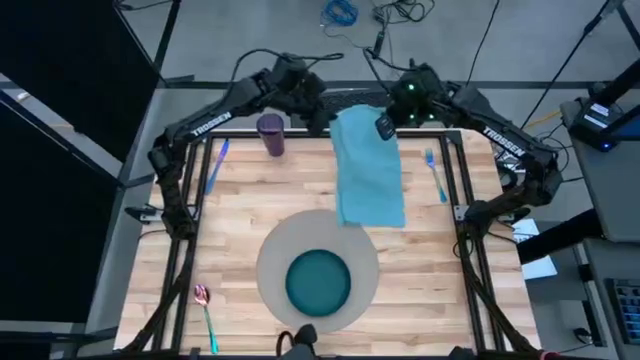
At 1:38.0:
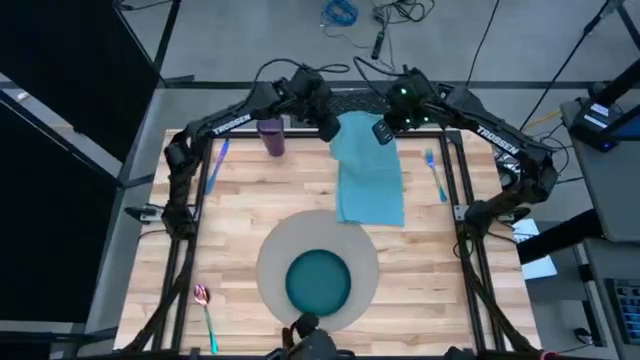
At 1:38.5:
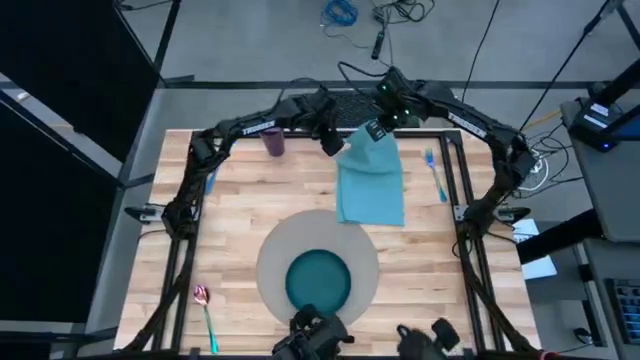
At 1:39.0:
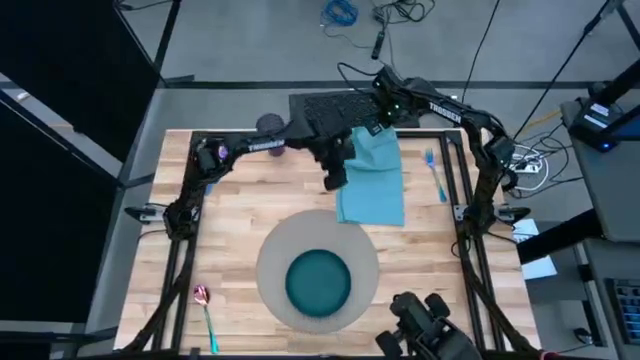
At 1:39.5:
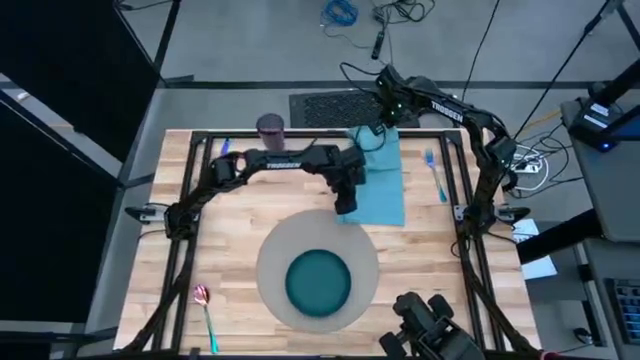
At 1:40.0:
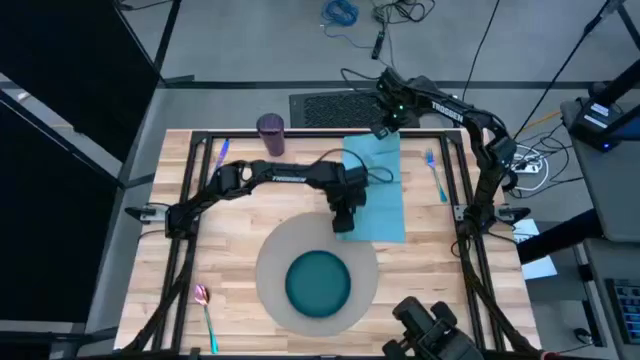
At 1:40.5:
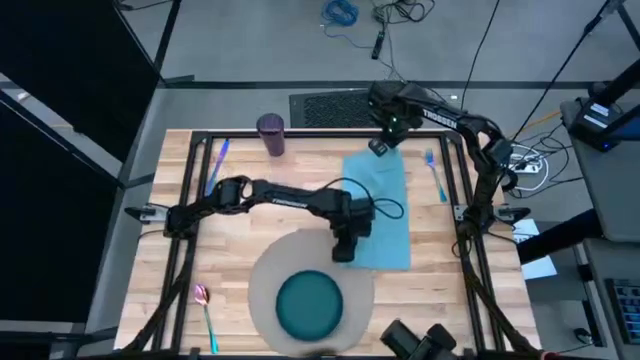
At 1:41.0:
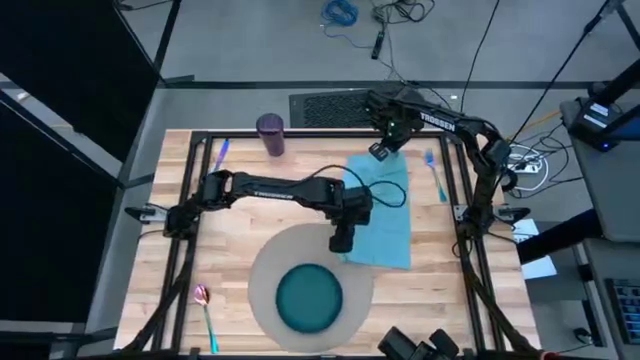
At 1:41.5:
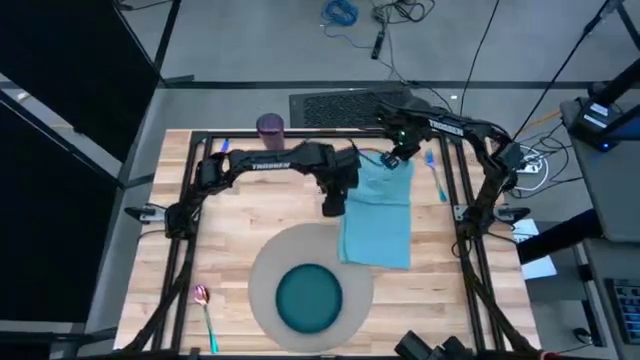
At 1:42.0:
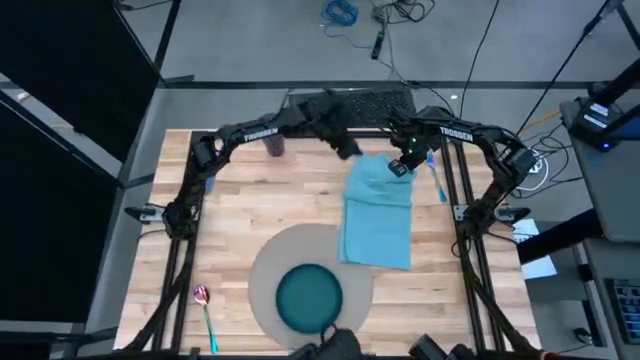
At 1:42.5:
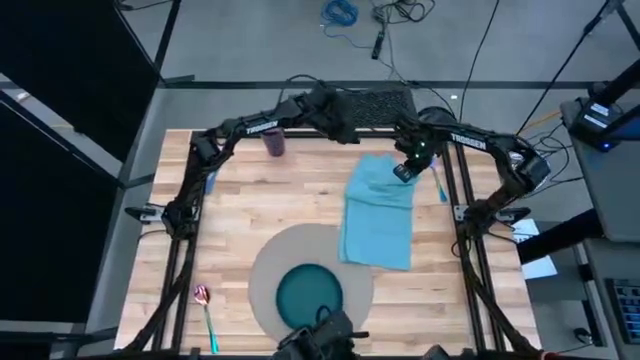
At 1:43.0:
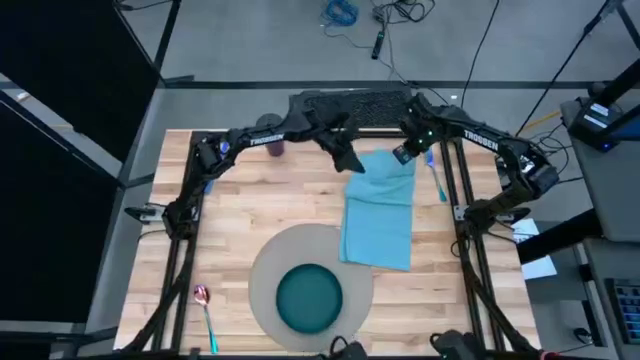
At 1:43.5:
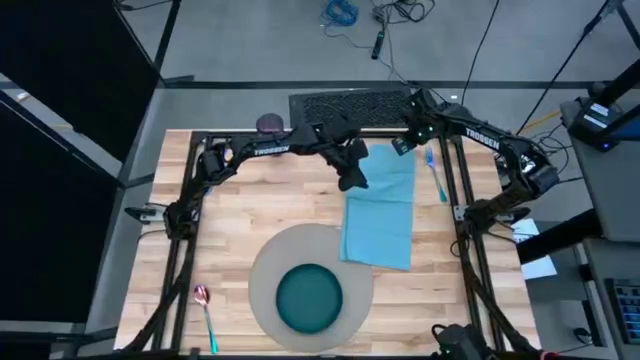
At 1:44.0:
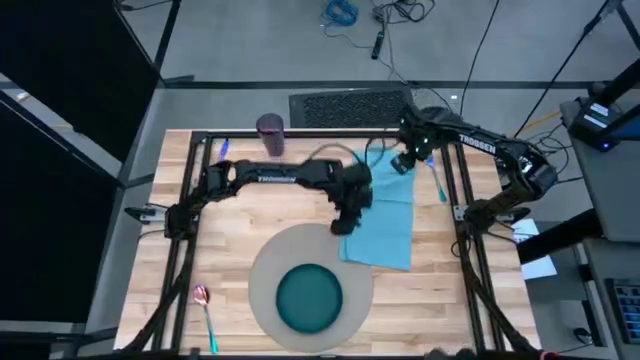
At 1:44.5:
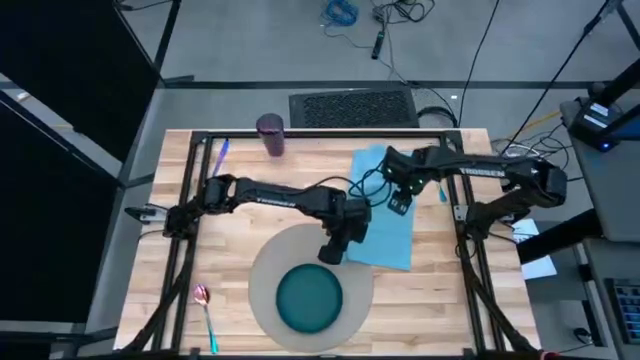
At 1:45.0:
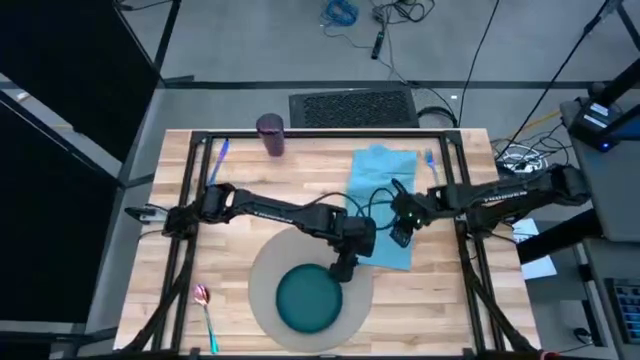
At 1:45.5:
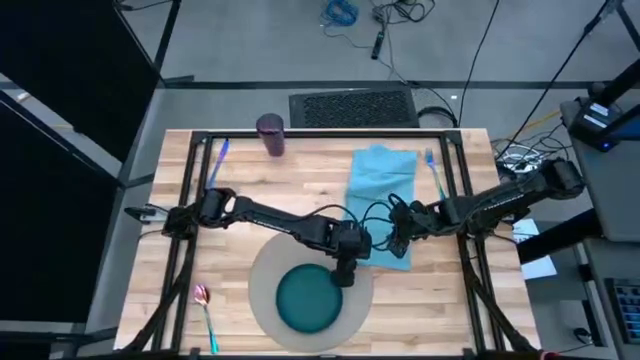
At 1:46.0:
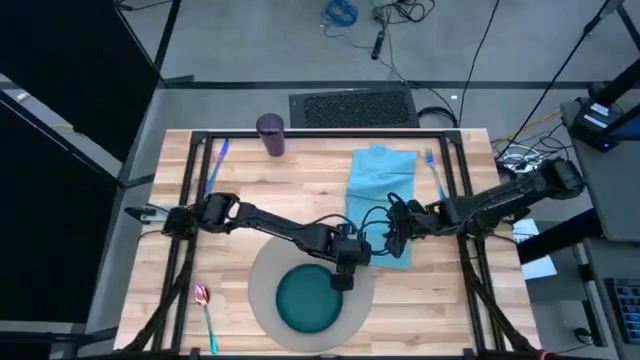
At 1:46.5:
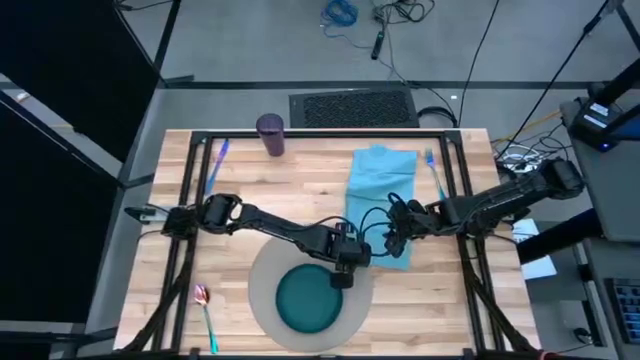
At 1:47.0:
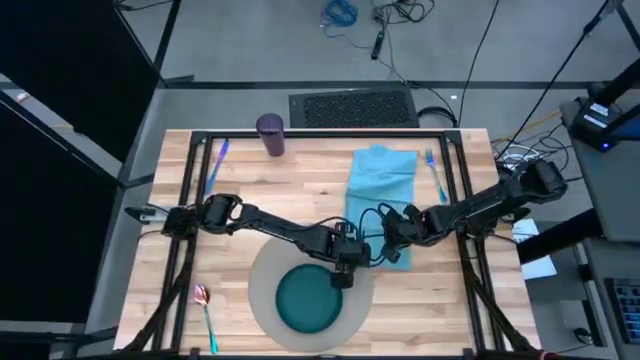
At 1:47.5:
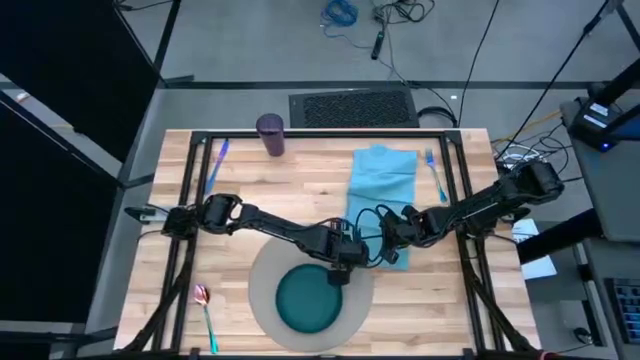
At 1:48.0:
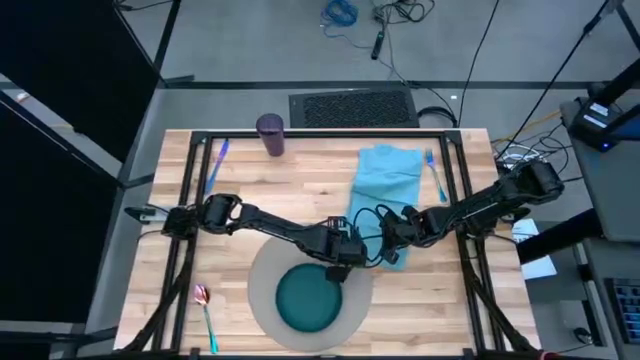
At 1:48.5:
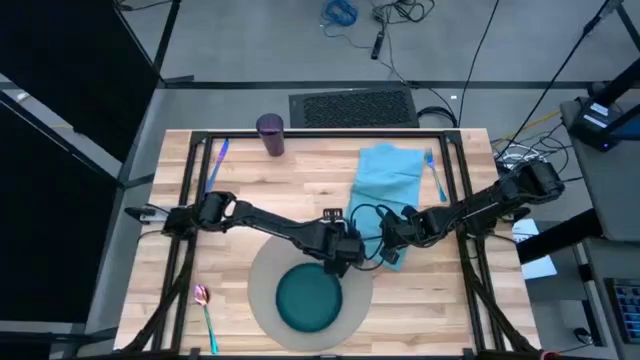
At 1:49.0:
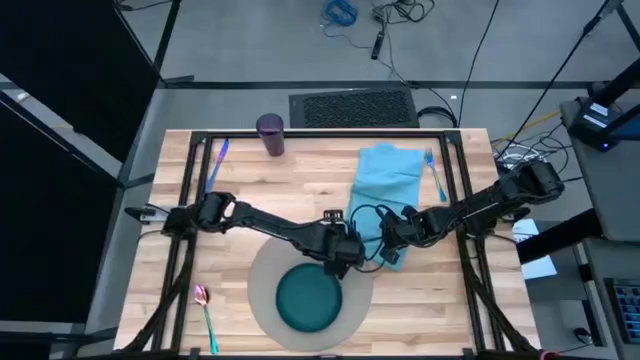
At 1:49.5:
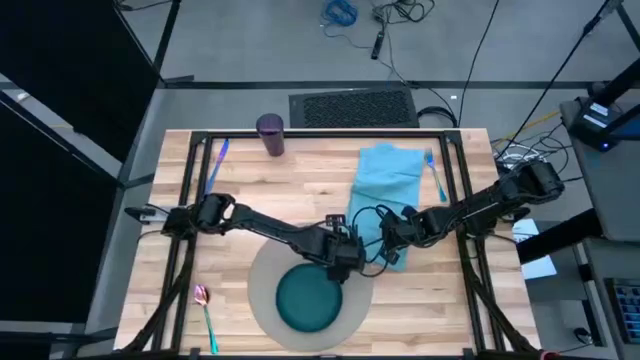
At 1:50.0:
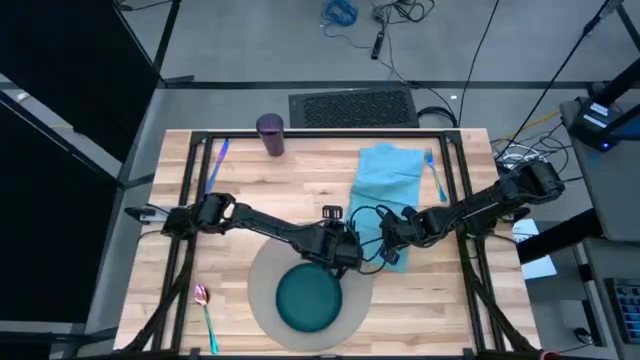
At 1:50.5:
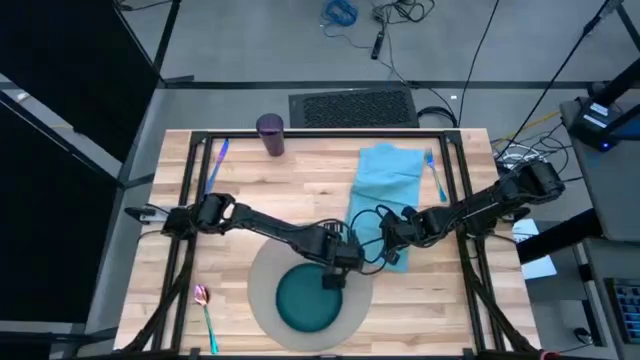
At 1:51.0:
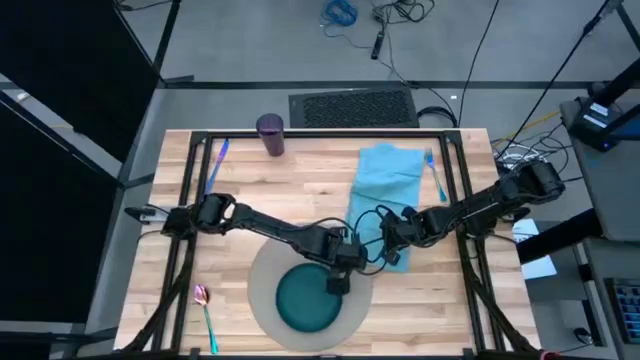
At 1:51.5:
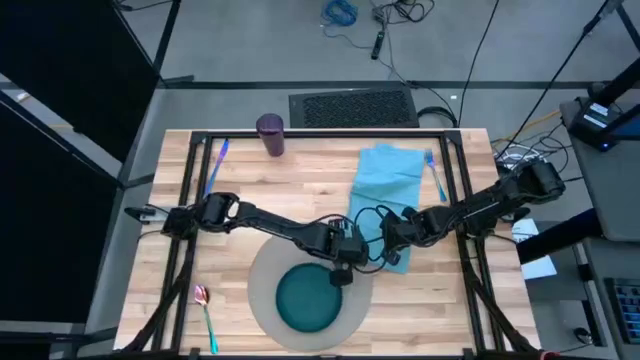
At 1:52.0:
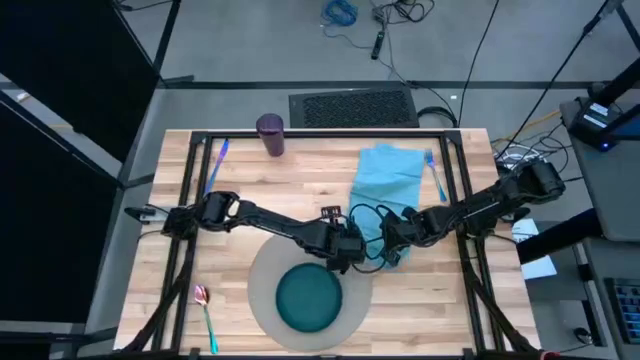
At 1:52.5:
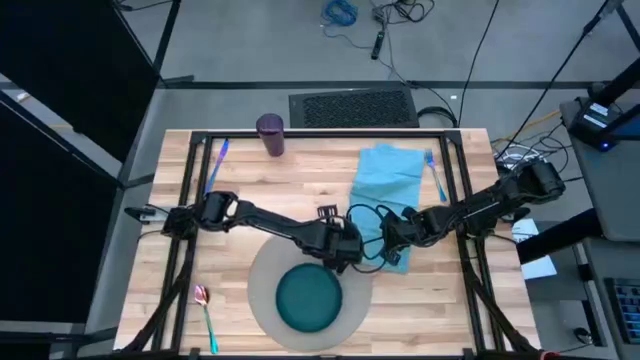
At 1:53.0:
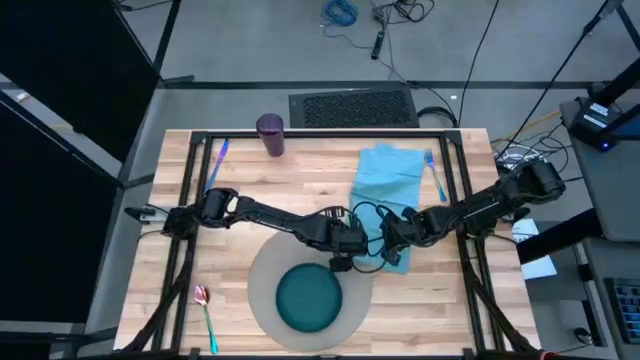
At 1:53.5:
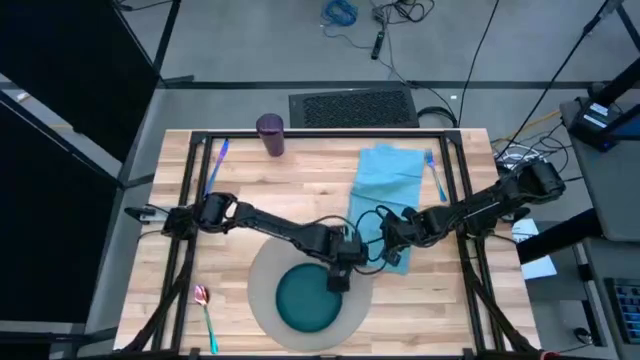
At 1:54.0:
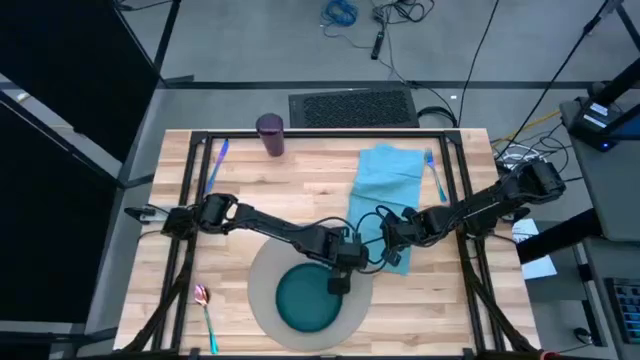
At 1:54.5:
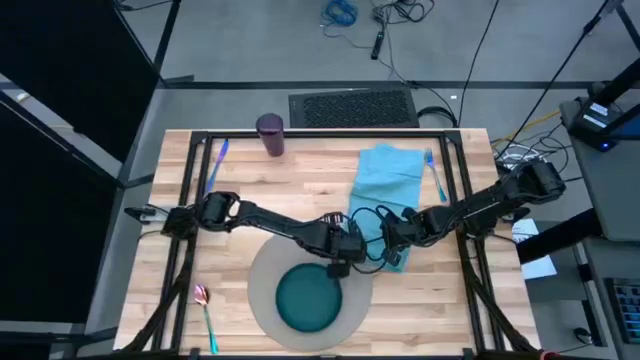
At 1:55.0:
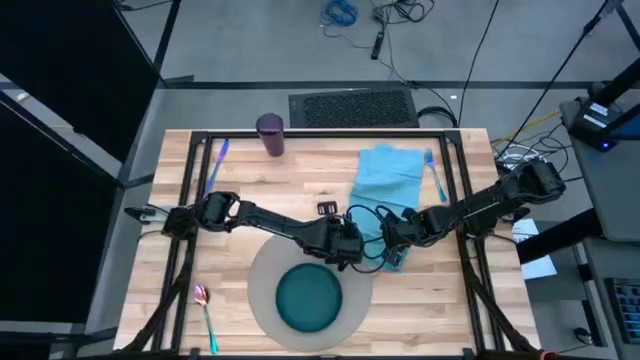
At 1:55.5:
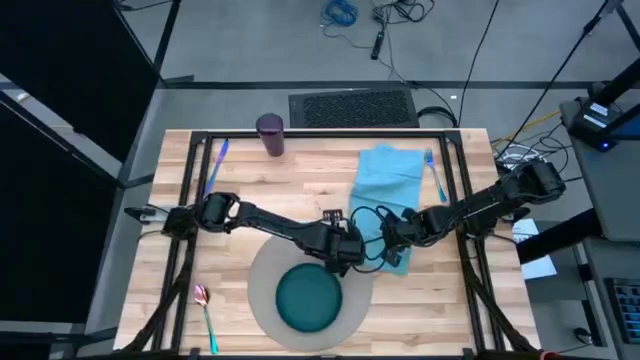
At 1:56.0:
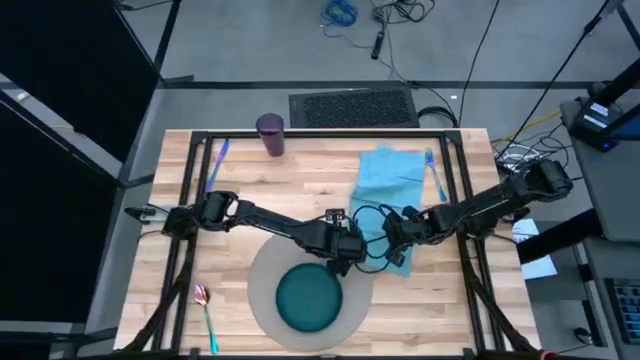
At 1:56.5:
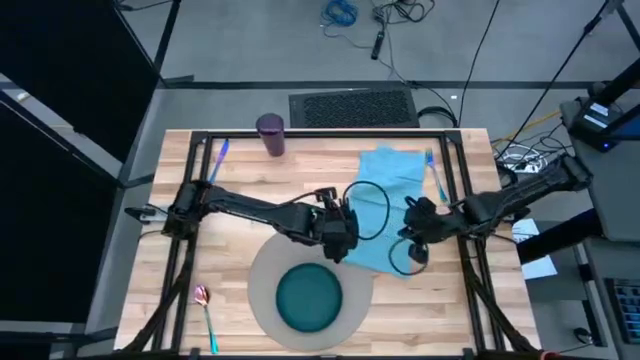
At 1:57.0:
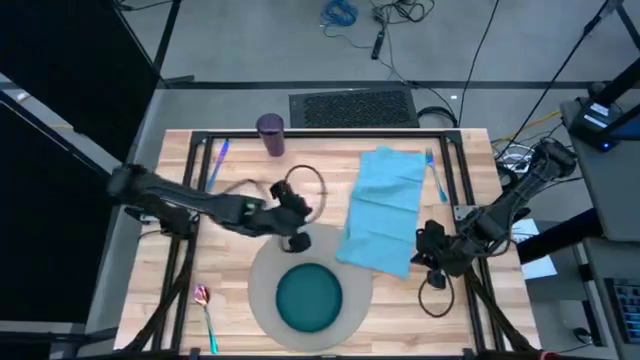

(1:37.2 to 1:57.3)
Task: Set table place
Fold the blue table napkin
